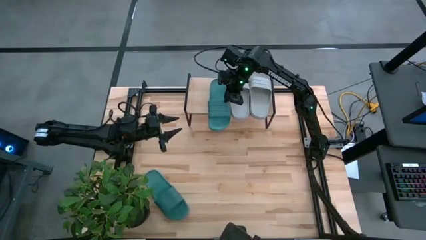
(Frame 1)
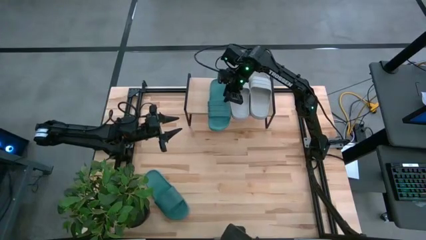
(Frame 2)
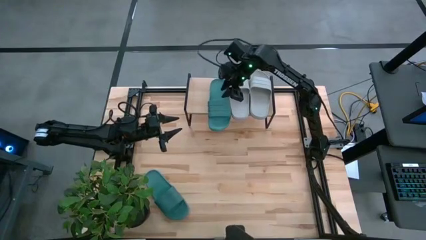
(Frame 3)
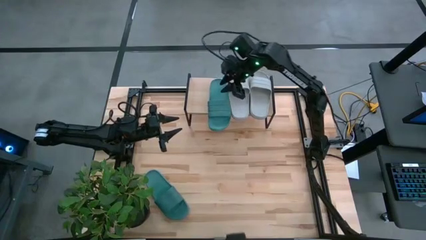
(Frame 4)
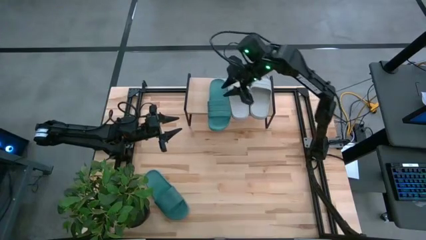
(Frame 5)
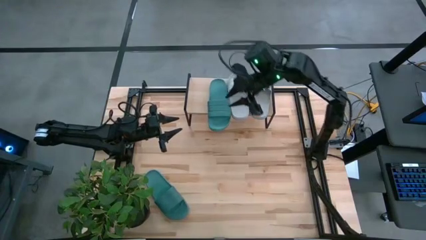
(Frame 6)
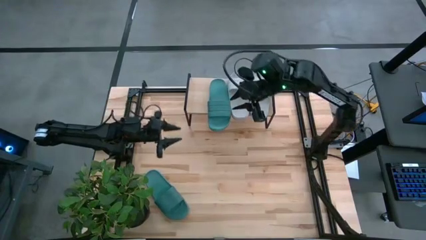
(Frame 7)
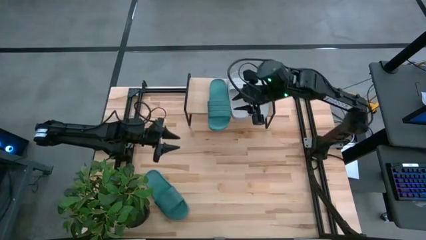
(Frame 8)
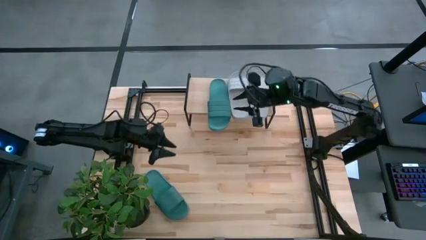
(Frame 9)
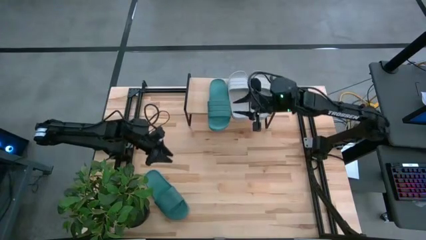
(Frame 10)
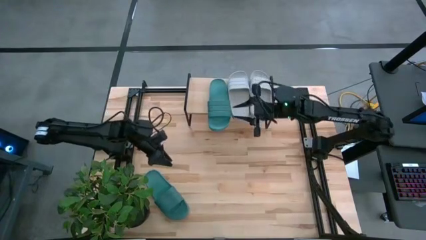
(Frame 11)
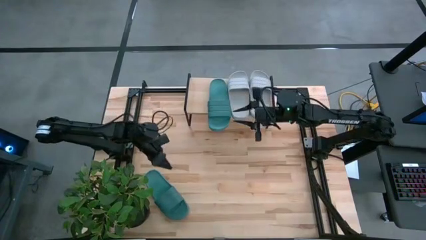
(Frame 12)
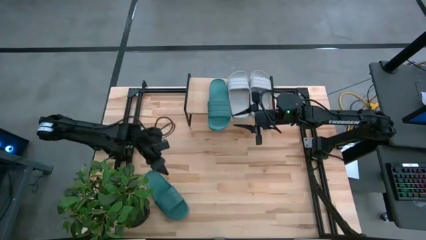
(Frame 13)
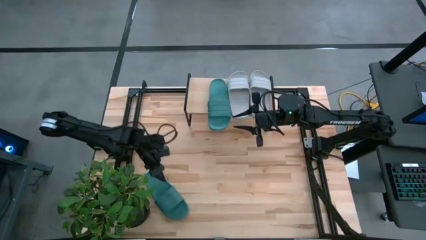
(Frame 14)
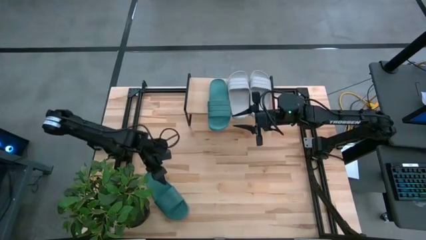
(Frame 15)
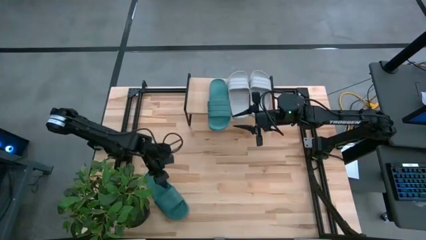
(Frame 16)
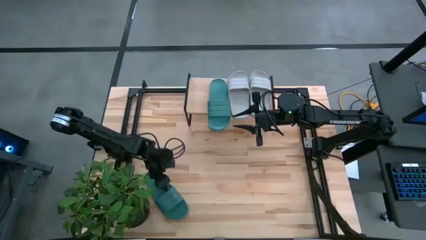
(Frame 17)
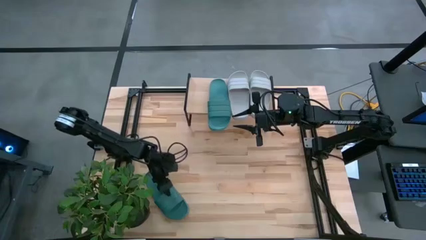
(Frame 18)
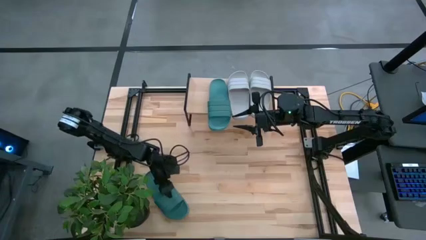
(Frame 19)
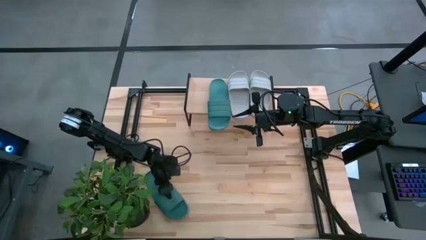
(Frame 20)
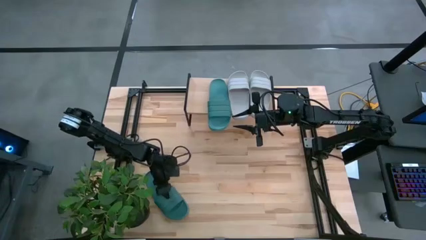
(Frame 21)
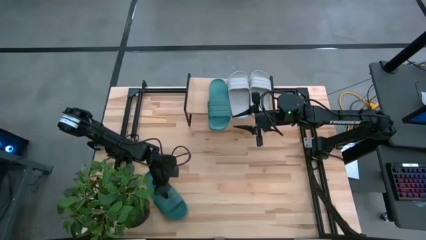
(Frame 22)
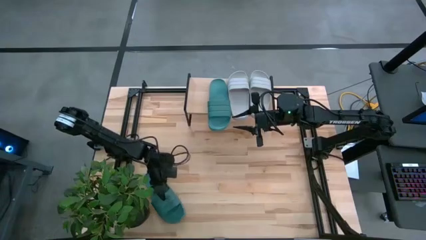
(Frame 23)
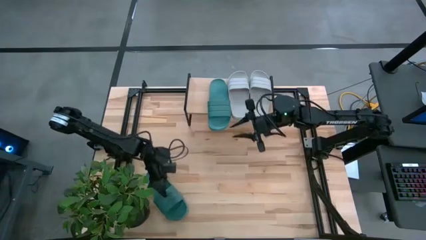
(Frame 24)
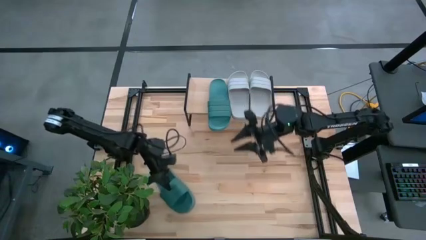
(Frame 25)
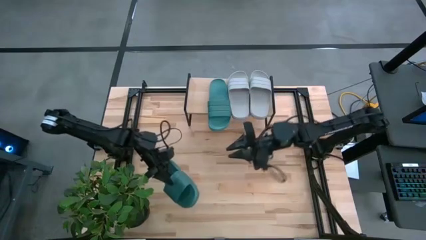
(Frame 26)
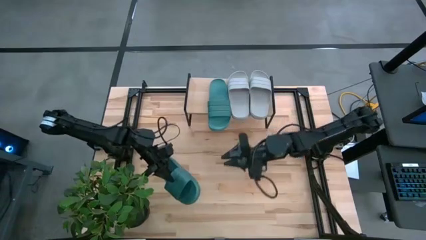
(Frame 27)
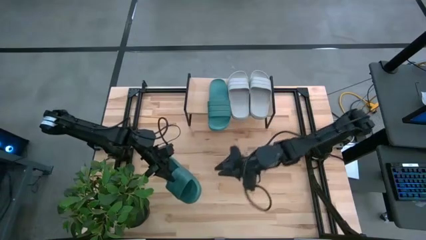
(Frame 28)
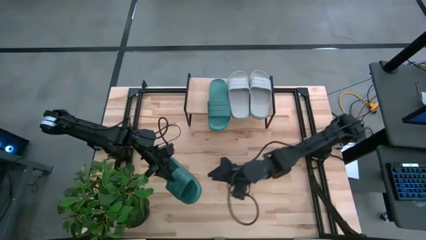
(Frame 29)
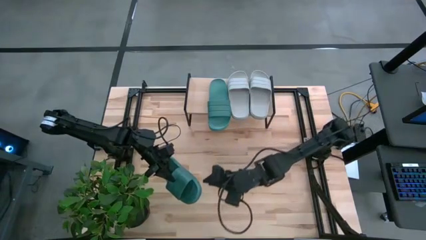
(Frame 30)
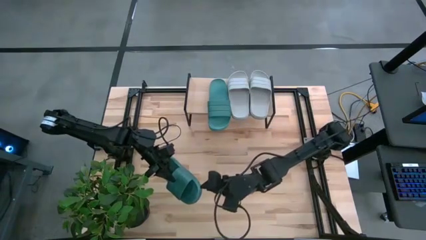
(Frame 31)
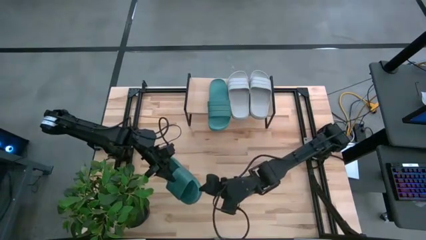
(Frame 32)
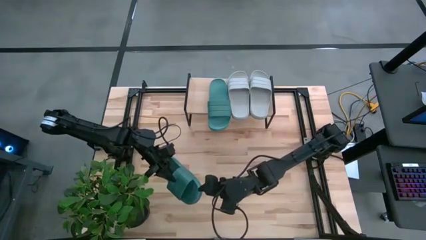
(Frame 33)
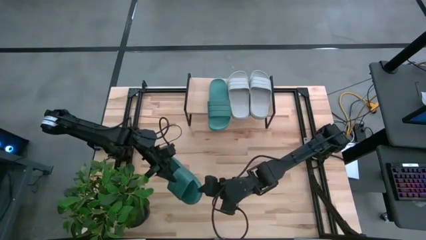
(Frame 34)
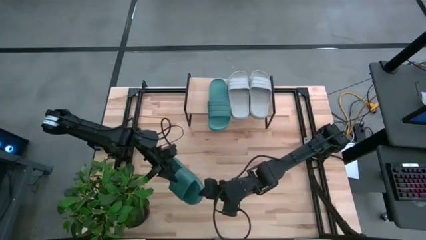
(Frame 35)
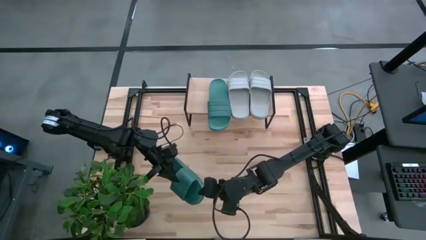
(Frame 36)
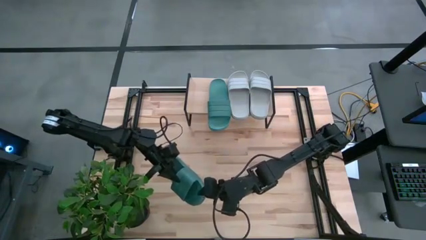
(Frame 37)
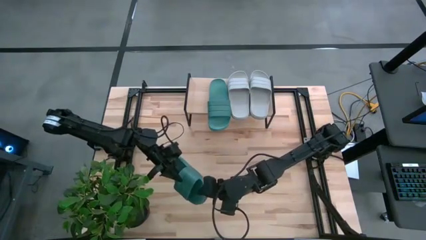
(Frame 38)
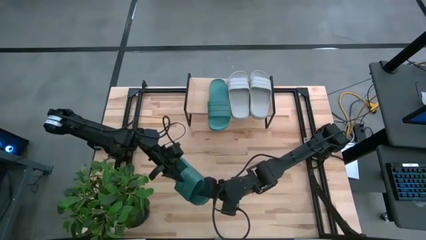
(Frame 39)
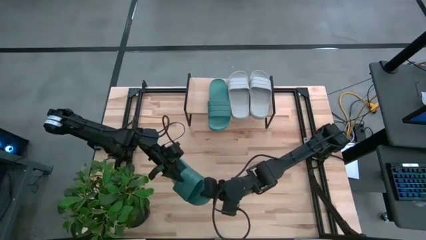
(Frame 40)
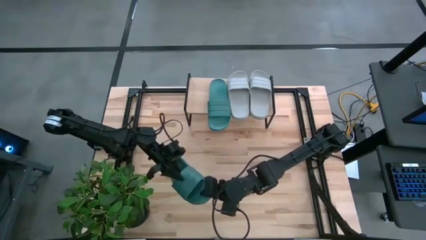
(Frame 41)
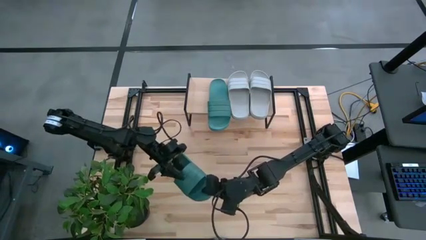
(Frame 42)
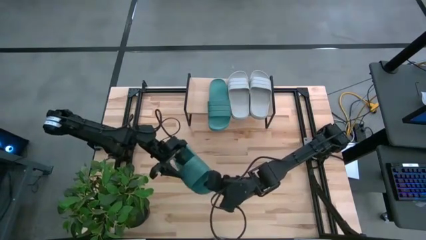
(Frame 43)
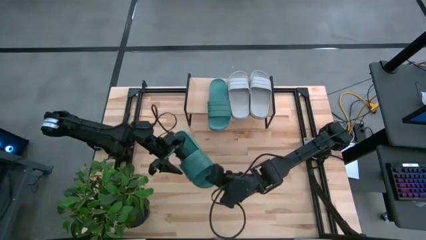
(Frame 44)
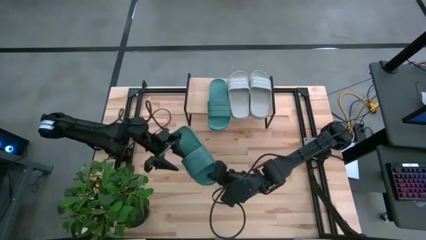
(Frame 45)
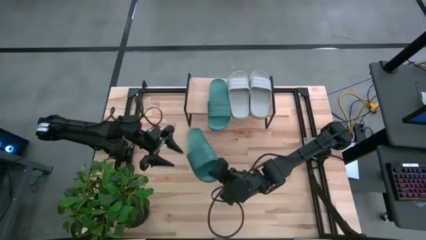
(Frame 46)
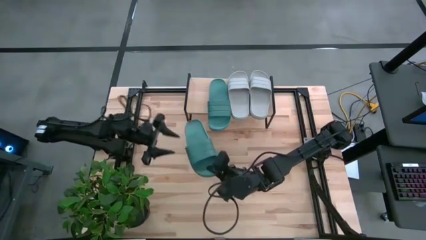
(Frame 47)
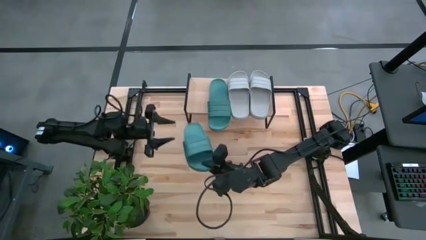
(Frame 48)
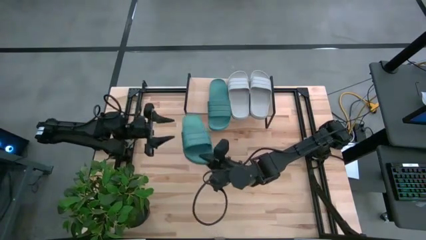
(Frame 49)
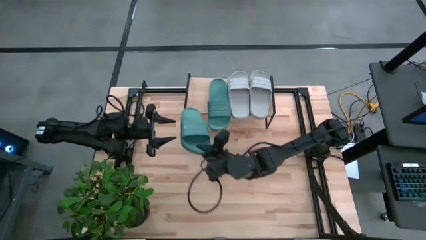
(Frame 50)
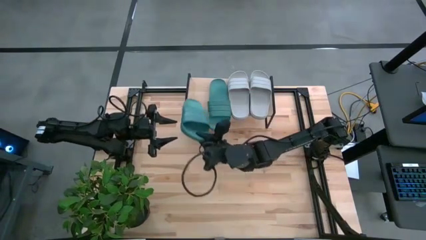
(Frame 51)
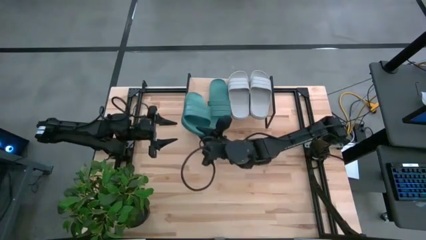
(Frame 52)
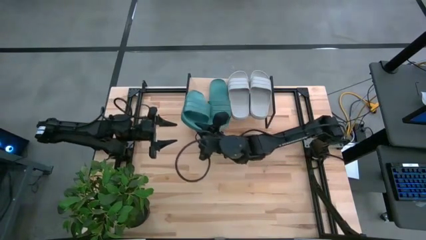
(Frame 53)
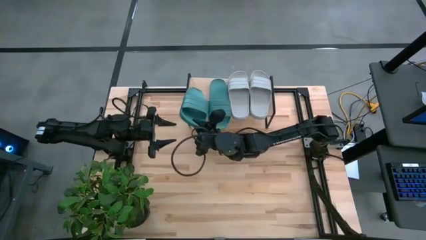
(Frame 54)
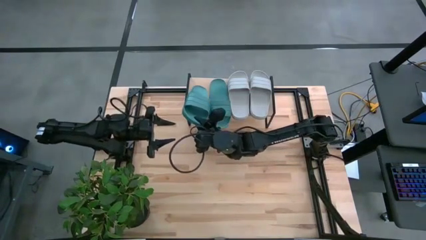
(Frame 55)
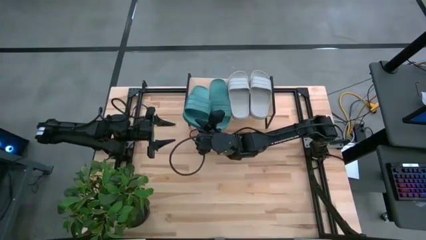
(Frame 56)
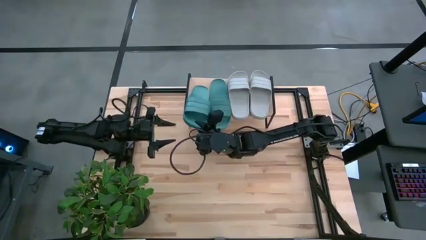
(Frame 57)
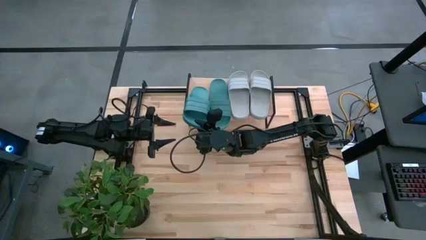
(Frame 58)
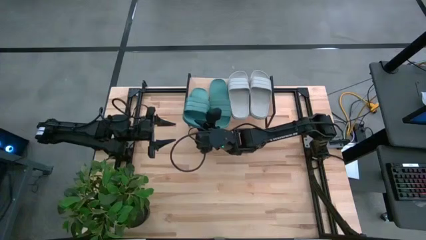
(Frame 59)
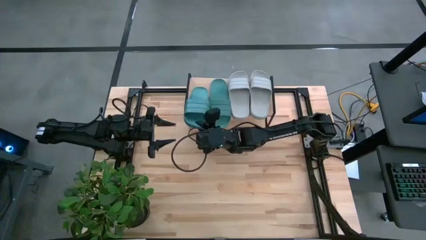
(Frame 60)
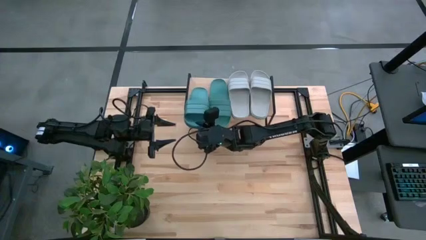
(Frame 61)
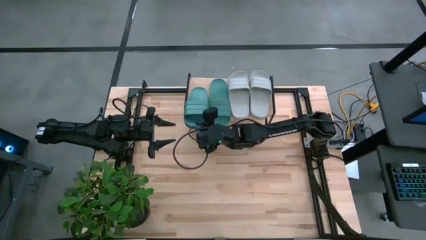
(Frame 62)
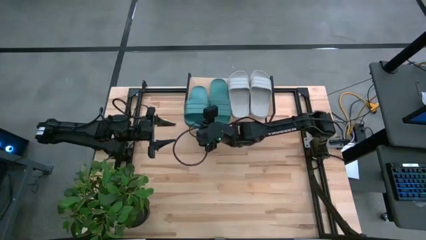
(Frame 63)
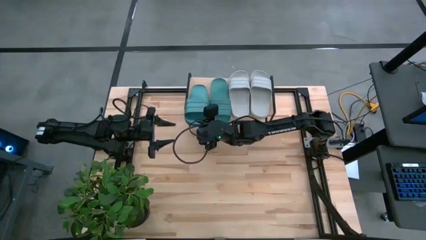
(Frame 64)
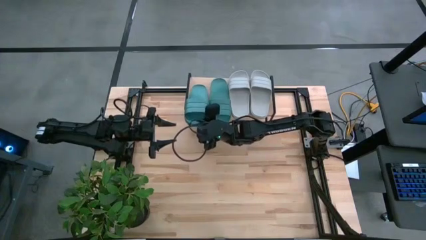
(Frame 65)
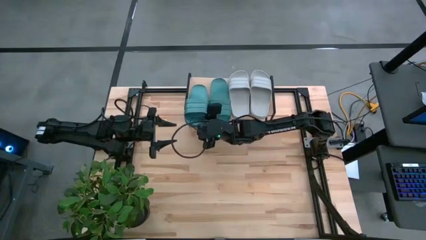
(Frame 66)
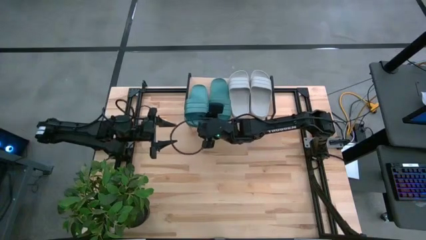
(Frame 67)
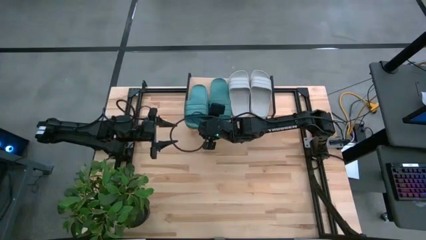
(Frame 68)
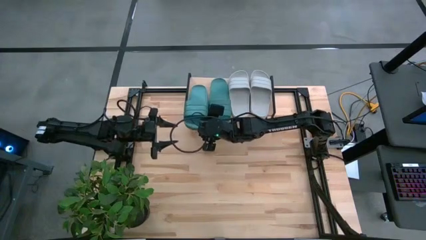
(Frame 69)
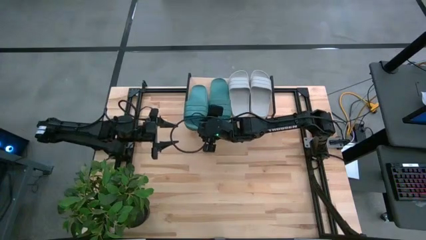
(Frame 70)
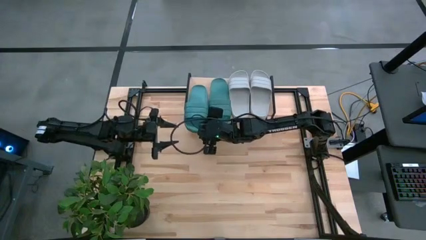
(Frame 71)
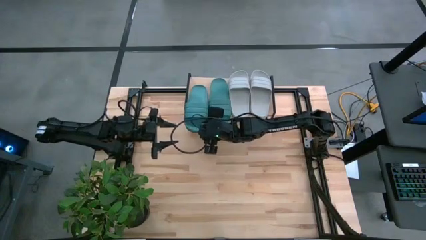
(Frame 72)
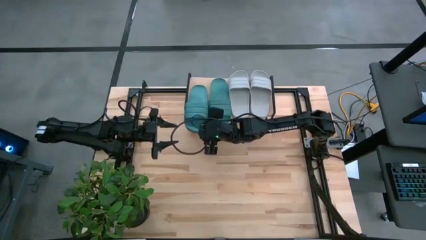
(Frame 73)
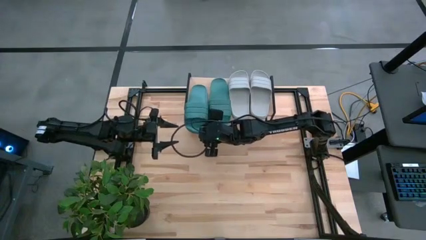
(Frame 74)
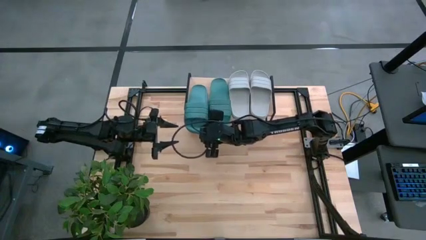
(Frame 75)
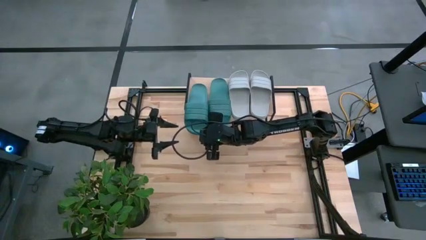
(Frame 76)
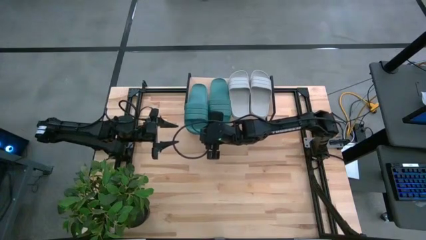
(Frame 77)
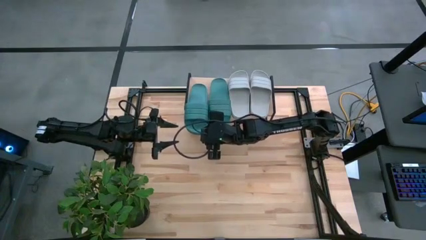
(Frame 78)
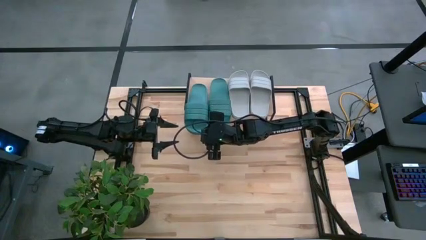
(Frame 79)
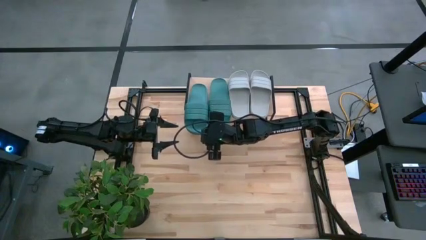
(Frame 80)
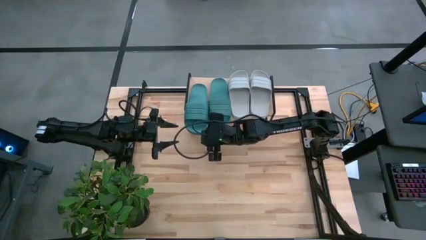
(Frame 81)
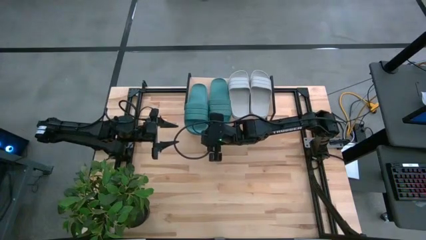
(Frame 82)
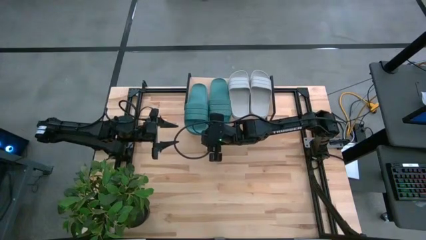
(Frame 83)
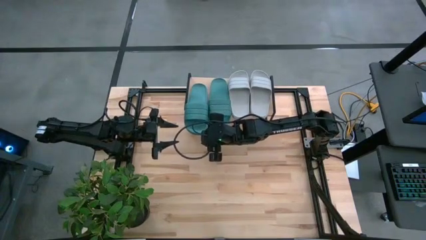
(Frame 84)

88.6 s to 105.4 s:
Task: Pick and place slides into the shelf
Put the green slipper on the shelf
